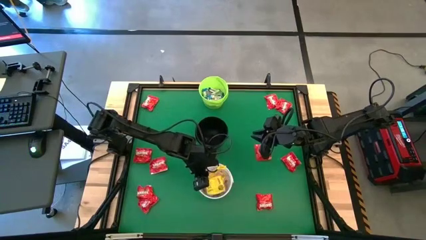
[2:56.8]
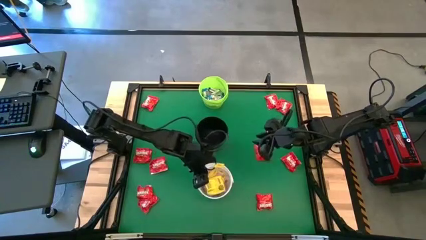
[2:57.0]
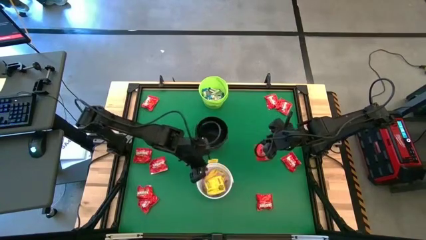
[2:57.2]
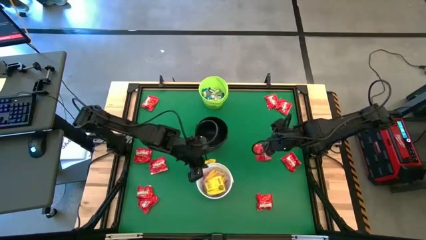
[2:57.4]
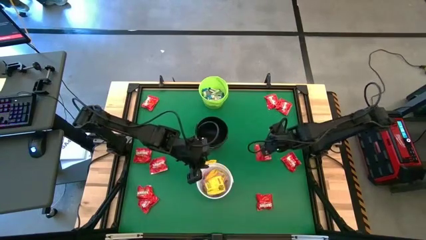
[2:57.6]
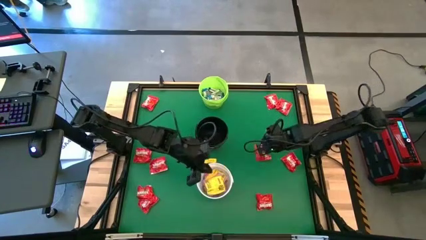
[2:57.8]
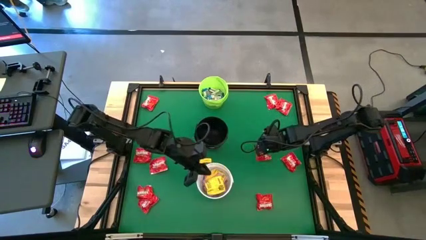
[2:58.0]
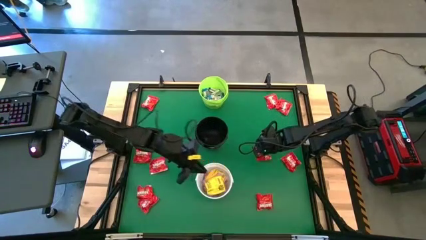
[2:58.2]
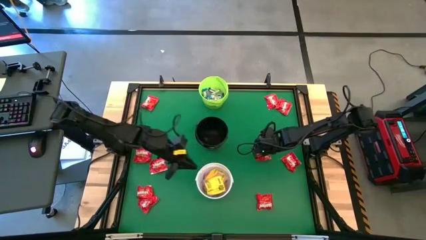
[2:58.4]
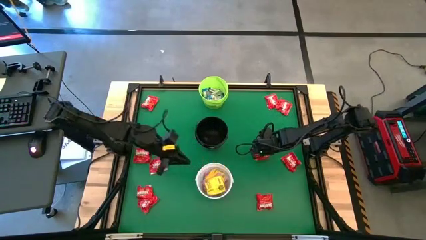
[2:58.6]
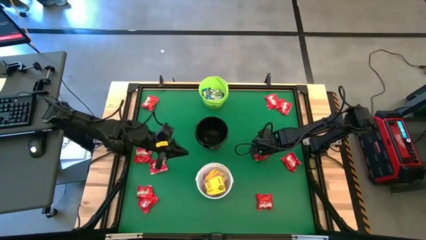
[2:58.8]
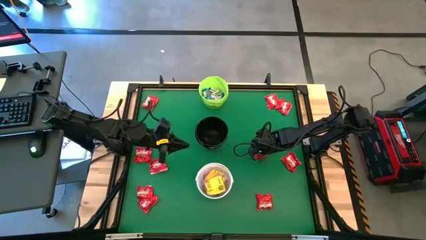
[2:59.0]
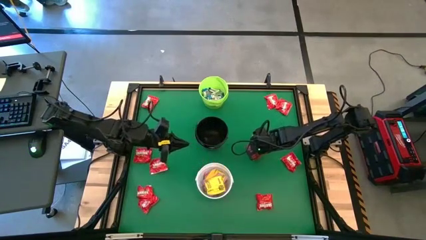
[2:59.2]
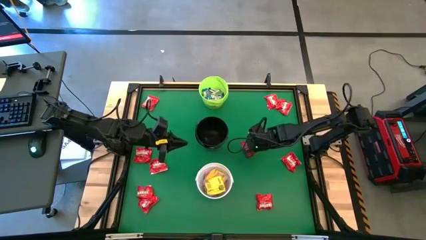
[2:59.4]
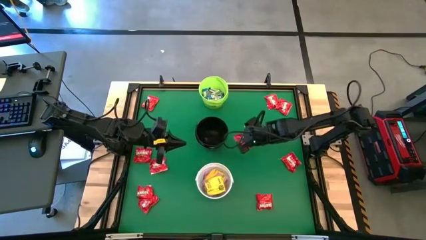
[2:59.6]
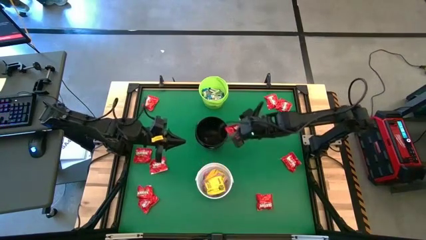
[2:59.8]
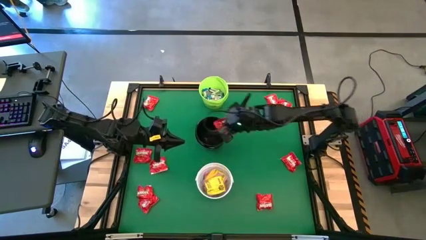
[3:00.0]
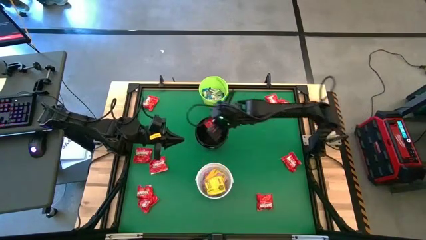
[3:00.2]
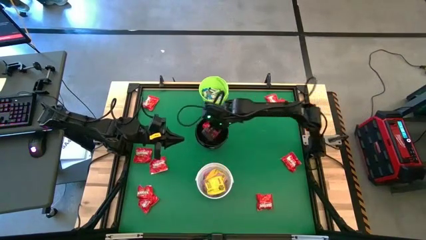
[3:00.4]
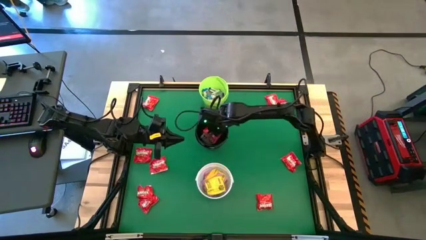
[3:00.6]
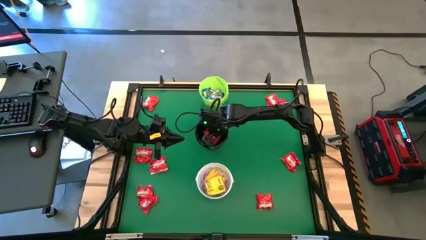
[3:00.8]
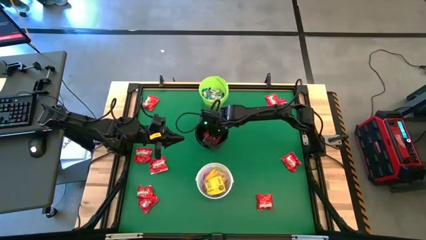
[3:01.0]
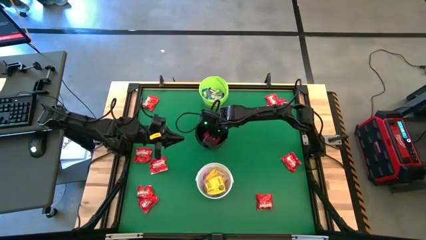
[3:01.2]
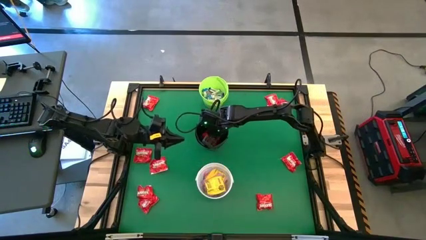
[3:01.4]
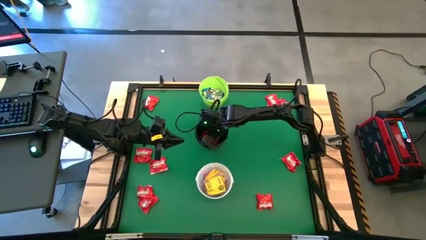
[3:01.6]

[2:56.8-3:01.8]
Task: Sort candy by brand, put in halloween buckets
Put the red chocolate into the black bucket

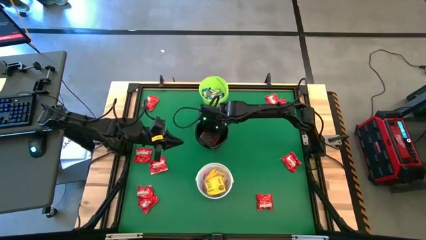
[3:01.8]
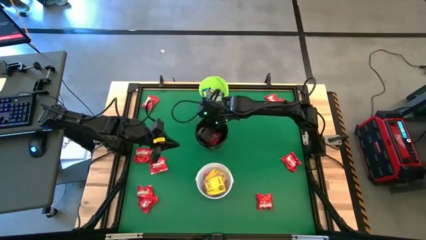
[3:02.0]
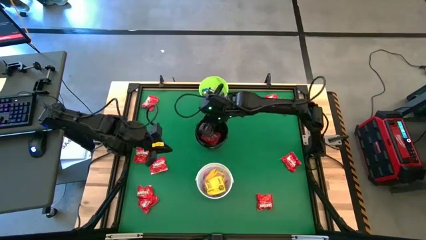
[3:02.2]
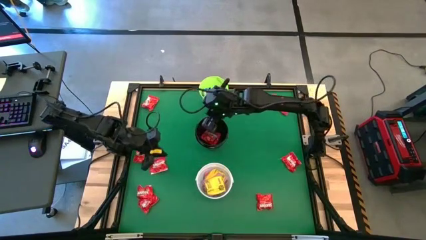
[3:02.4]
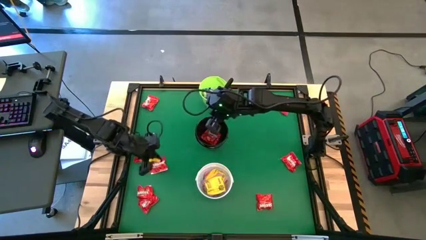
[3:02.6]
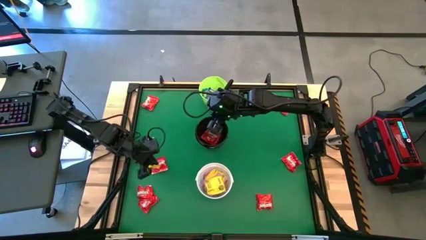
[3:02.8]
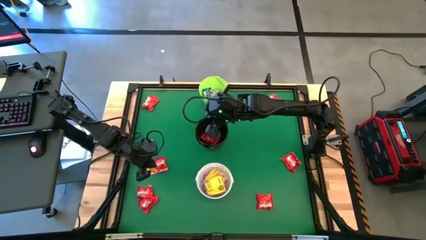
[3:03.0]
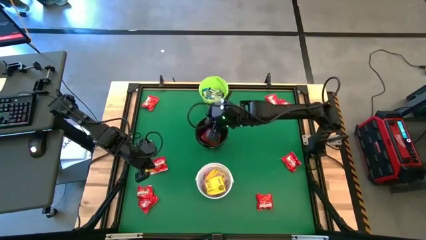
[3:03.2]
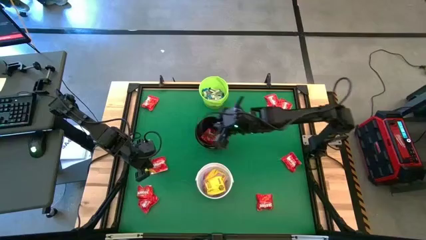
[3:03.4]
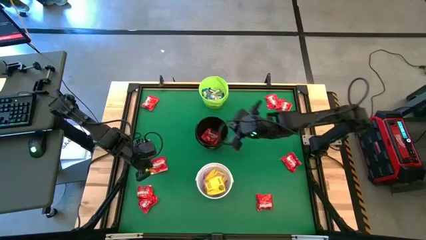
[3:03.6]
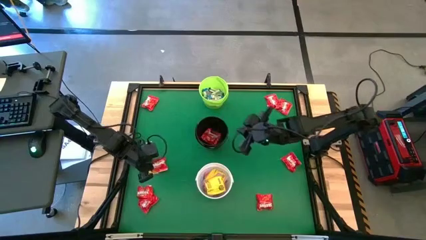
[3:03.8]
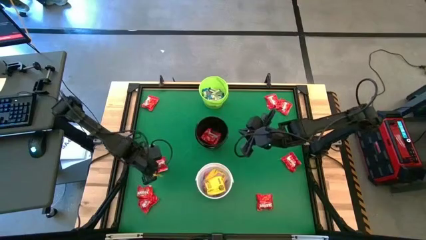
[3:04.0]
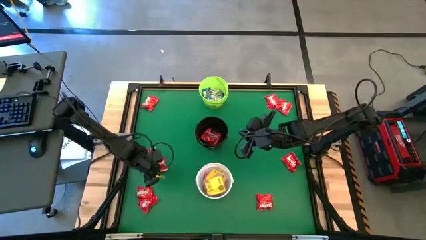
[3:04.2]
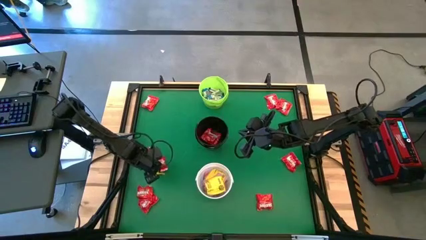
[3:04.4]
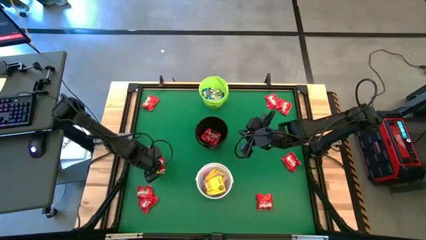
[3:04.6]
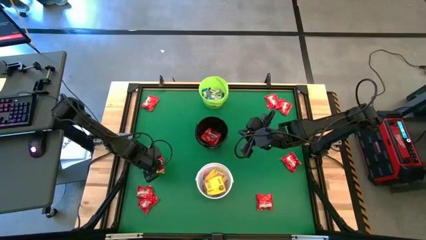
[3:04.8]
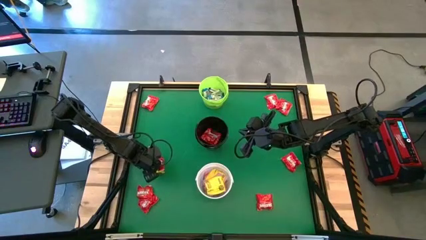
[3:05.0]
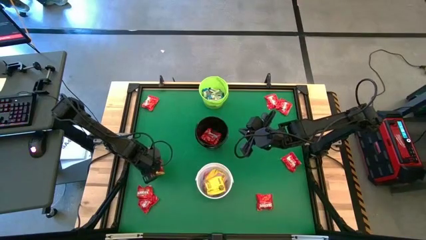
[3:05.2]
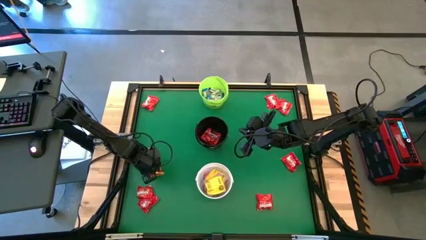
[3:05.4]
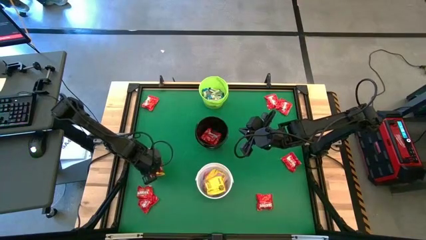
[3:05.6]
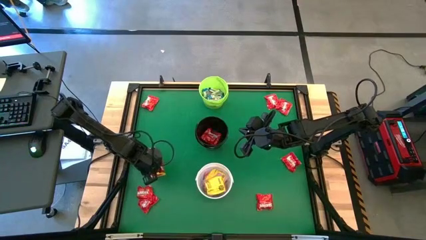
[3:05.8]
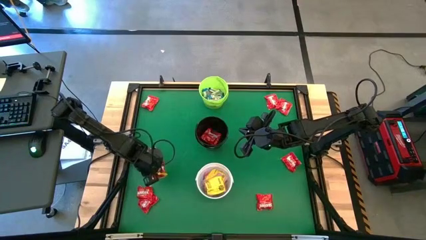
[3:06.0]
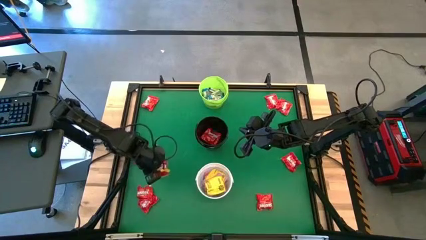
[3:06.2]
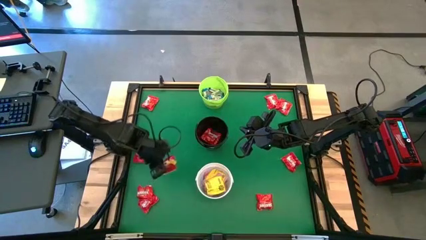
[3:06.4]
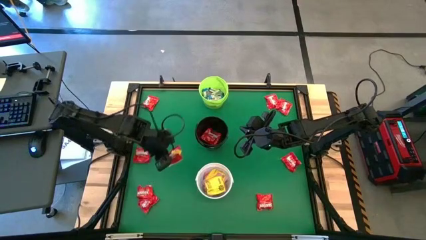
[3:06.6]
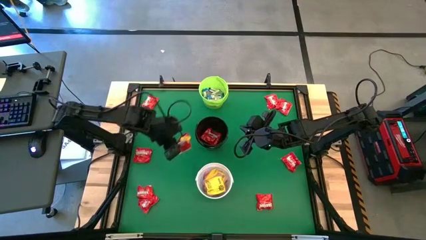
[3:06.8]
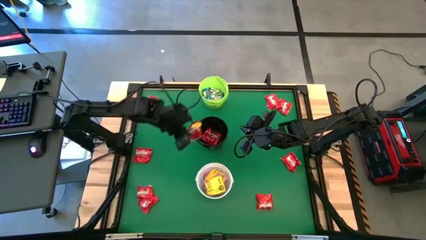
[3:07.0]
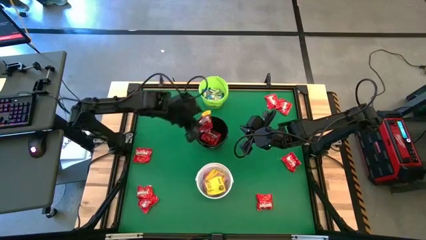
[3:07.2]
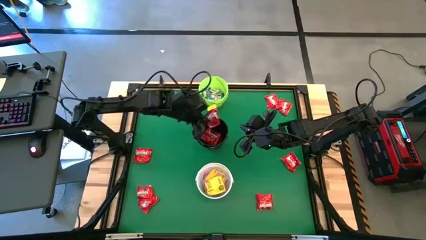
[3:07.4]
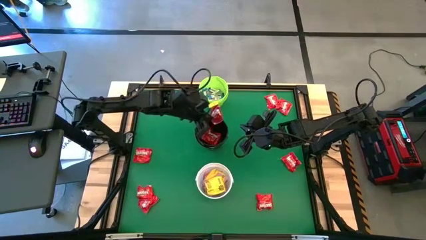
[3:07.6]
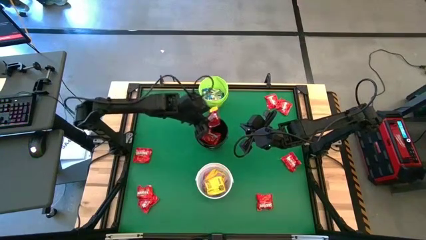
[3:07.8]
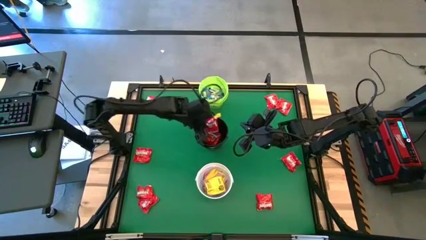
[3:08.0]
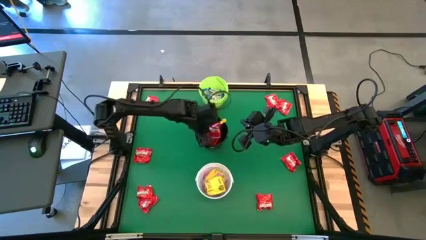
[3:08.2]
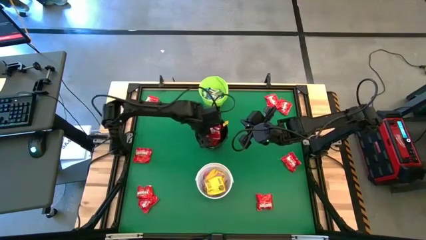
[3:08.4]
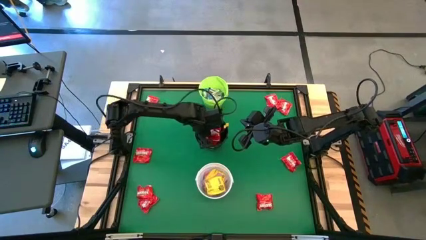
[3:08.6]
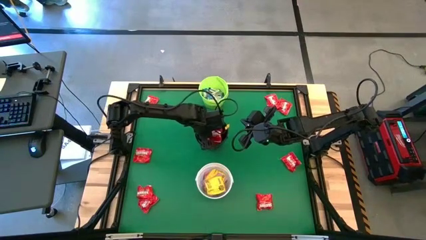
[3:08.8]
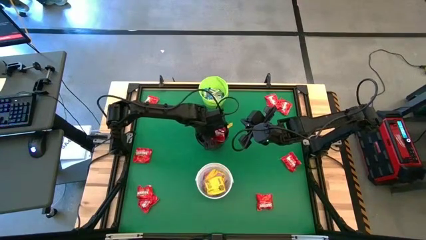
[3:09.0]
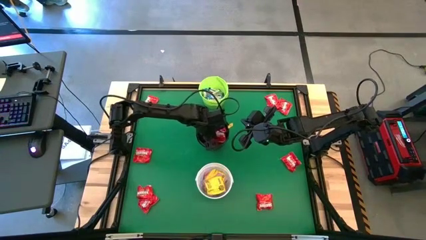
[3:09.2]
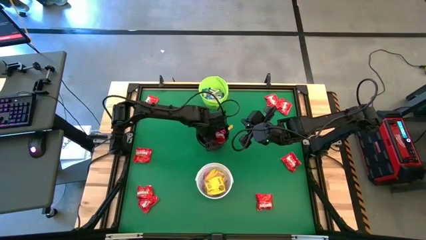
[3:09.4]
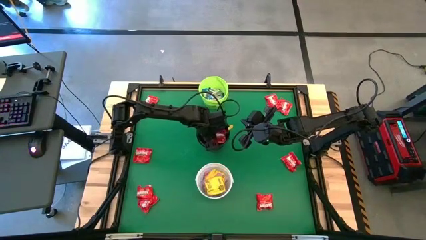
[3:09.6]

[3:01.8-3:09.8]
Put the red chocolate into the black bucket

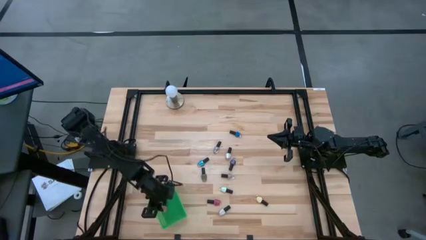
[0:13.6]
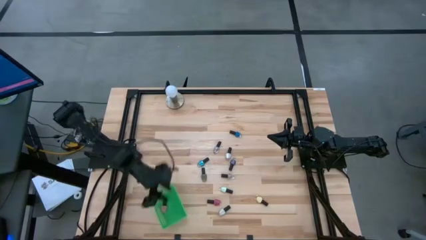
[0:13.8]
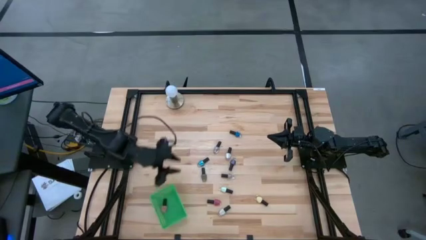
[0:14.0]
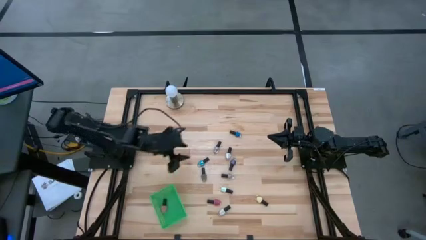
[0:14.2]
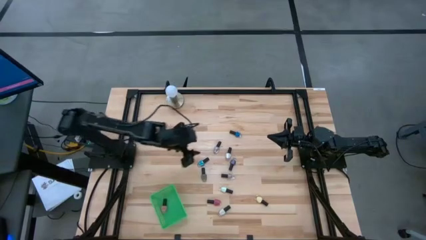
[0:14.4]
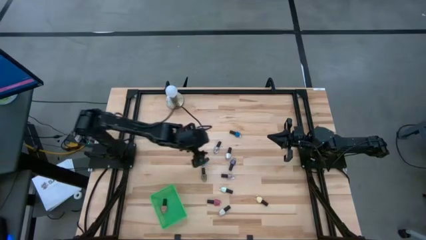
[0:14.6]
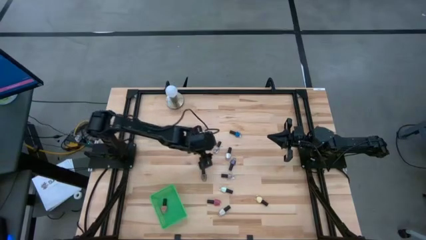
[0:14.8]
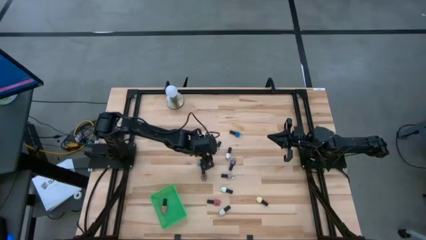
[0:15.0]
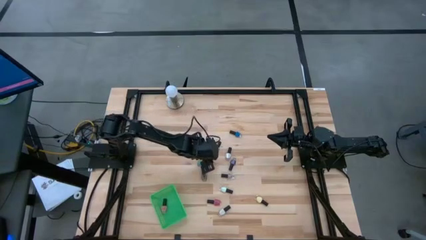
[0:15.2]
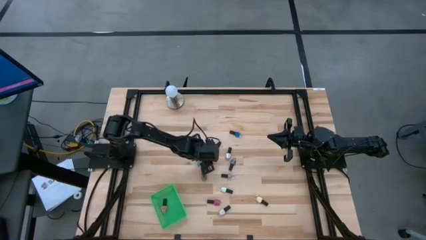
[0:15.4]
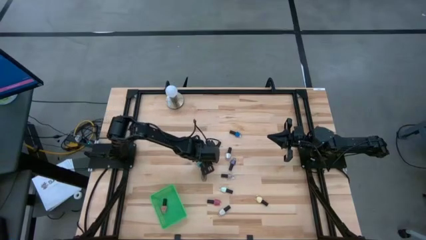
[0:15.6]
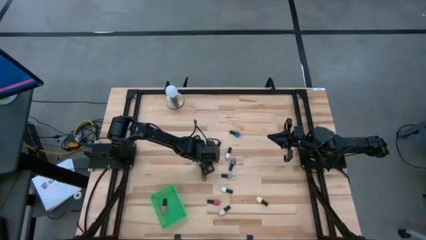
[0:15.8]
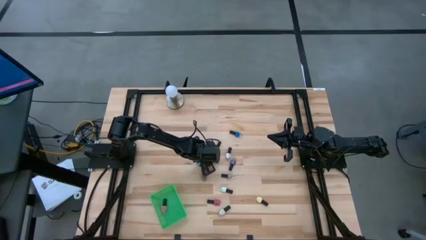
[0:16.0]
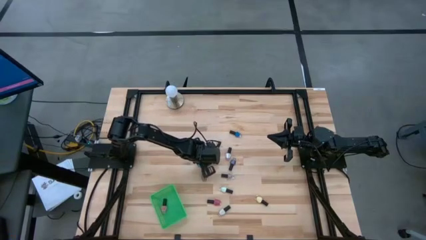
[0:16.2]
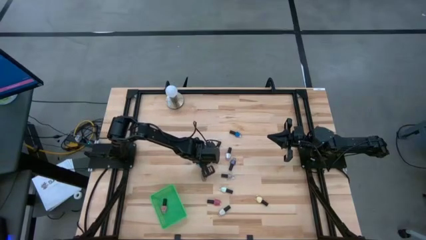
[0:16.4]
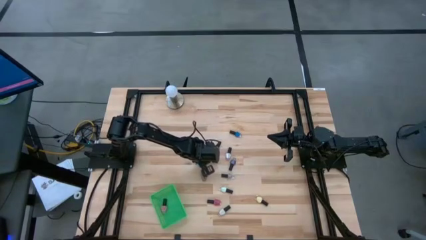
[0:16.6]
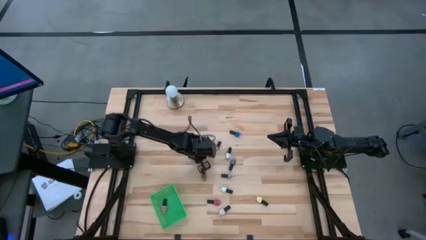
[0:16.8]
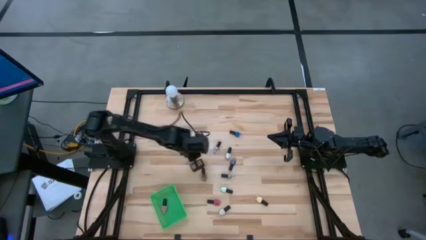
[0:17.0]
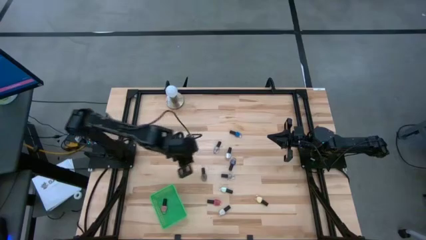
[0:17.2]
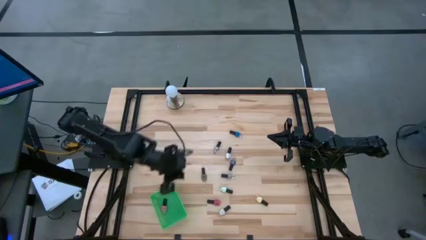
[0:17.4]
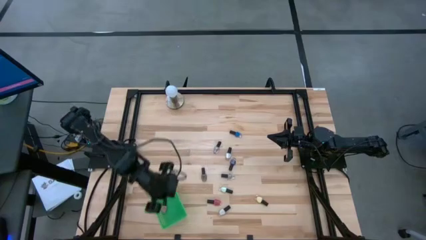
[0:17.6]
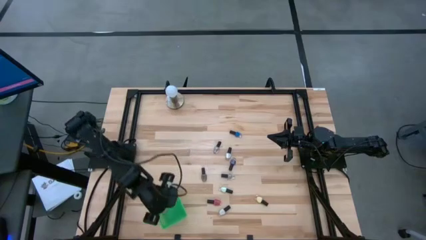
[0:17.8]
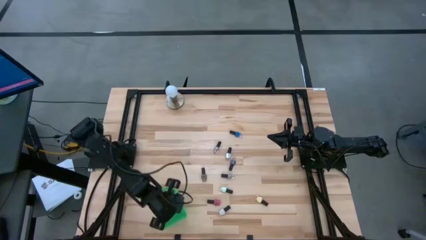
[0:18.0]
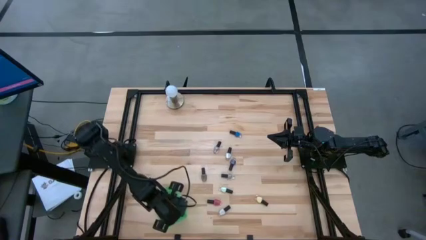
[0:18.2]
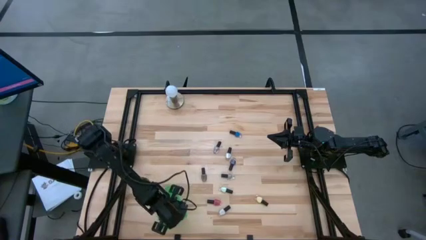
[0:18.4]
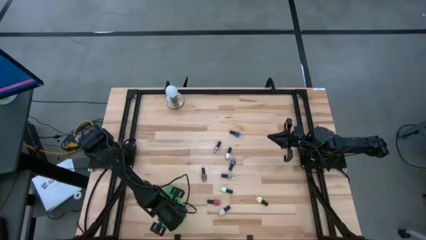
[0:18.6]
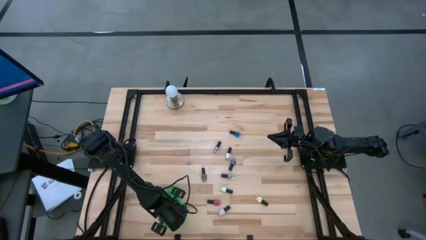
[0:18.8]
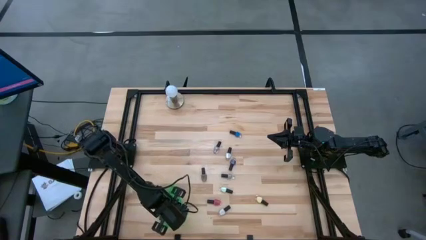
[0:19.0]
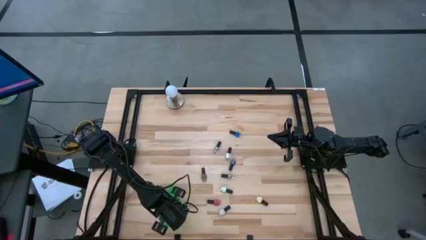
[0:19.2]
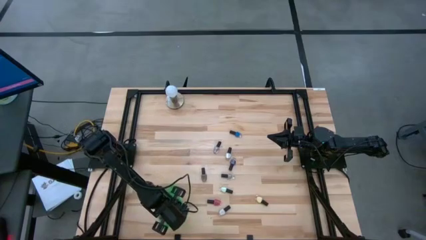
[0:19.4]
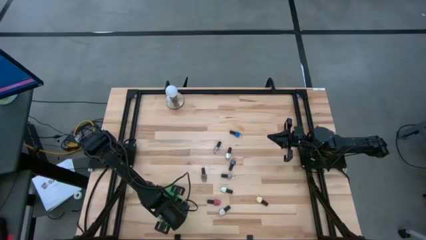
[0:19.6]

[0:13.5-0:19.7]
Task: Pick & Place Nail Polish
Put the black blue nail polish bottle into the green basket
